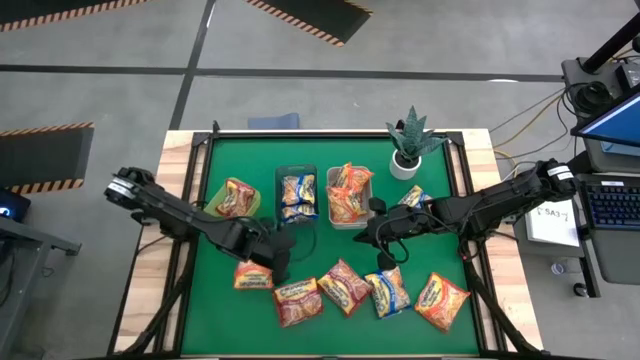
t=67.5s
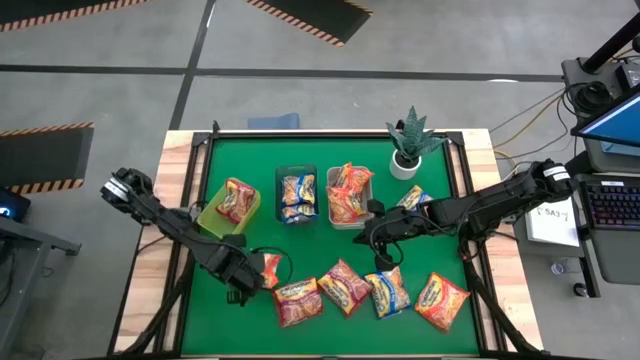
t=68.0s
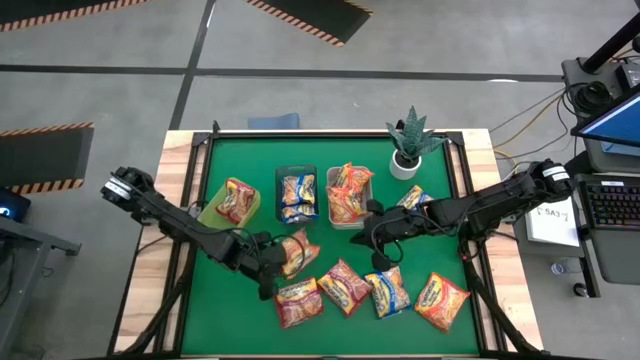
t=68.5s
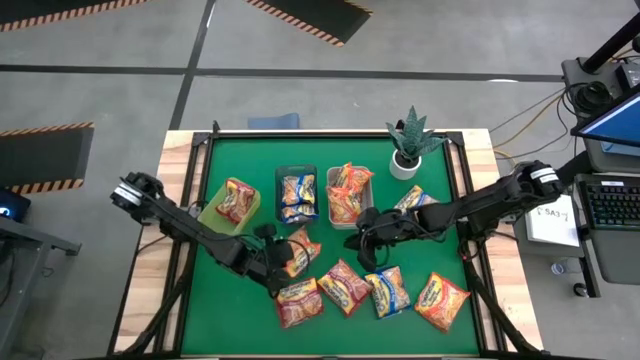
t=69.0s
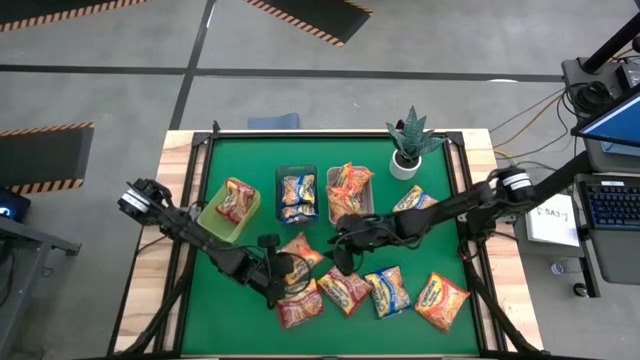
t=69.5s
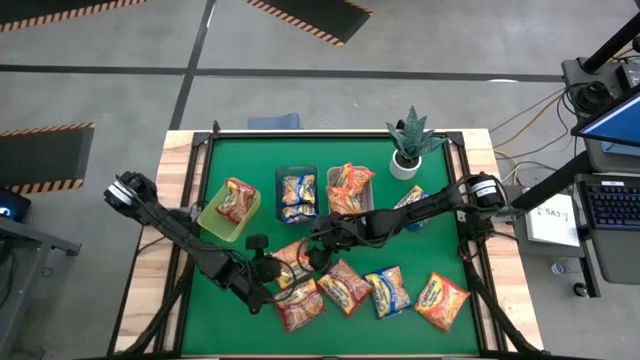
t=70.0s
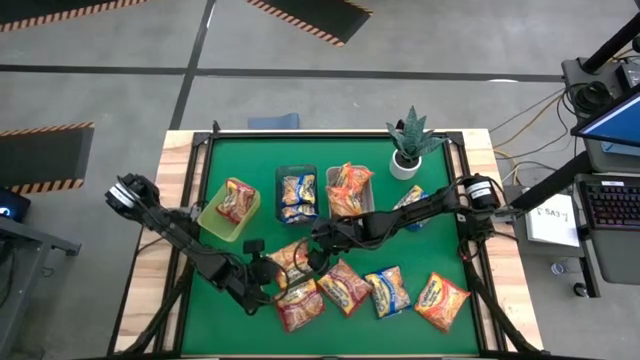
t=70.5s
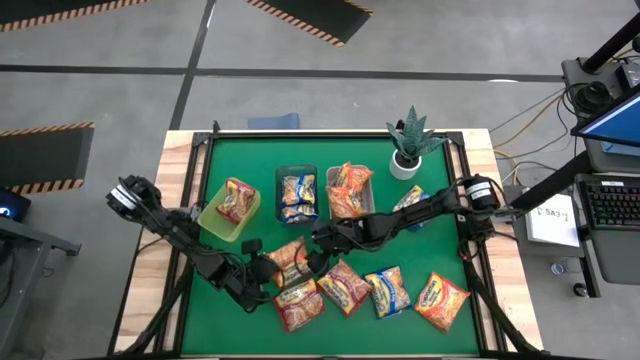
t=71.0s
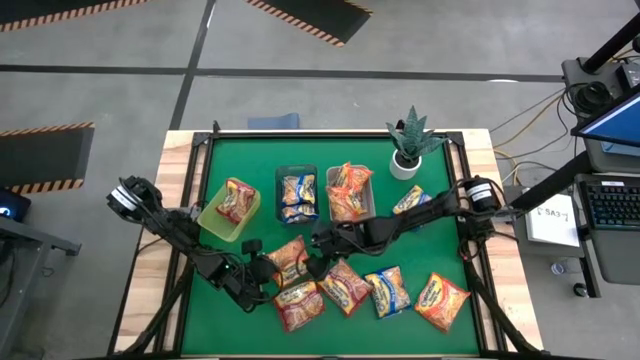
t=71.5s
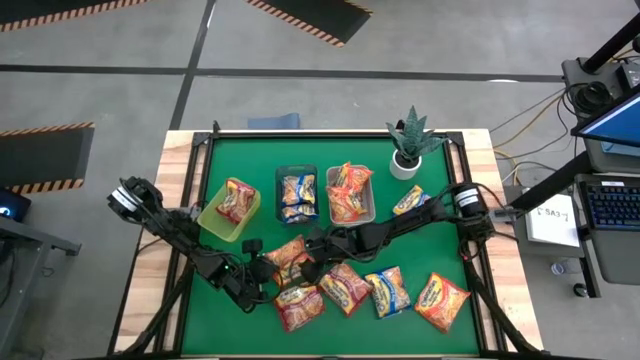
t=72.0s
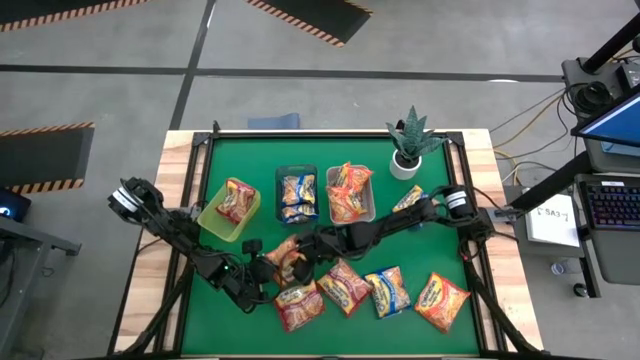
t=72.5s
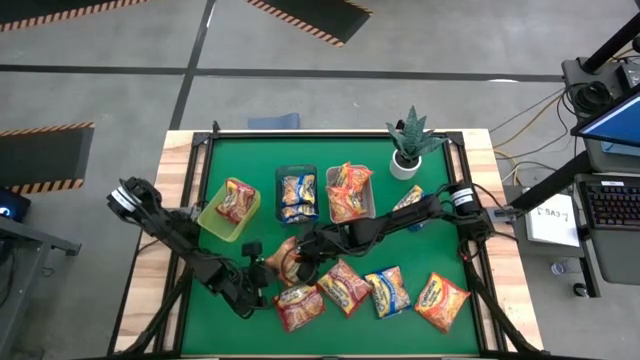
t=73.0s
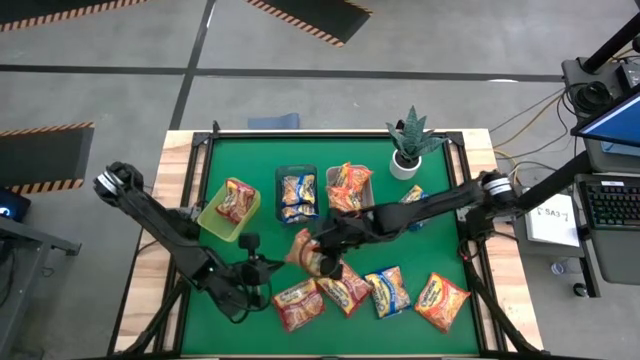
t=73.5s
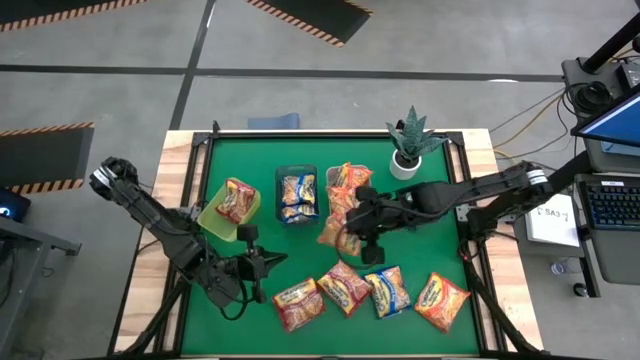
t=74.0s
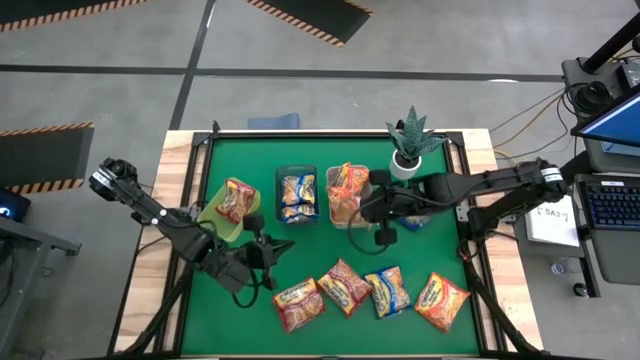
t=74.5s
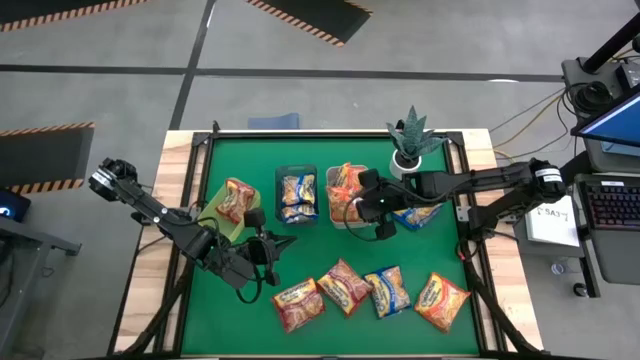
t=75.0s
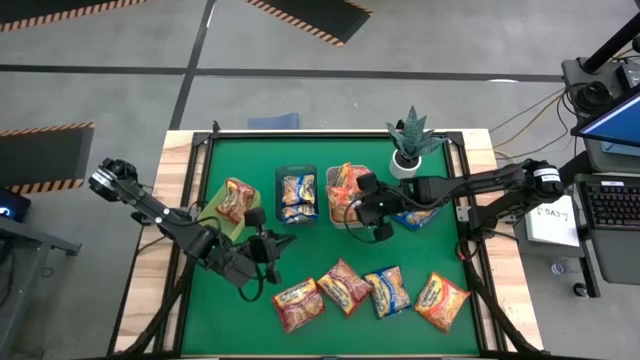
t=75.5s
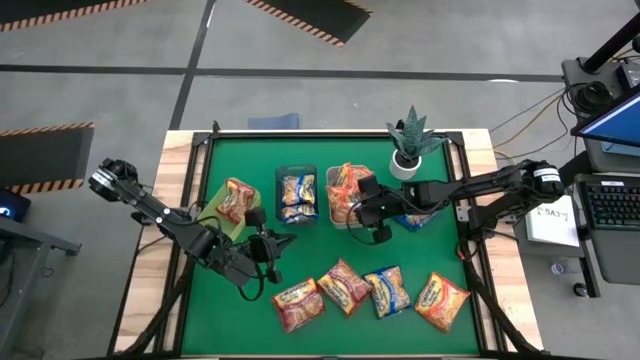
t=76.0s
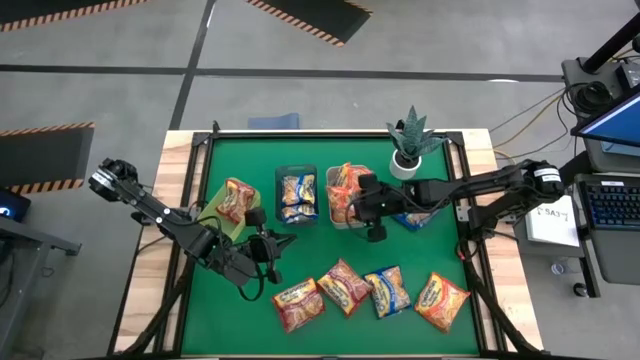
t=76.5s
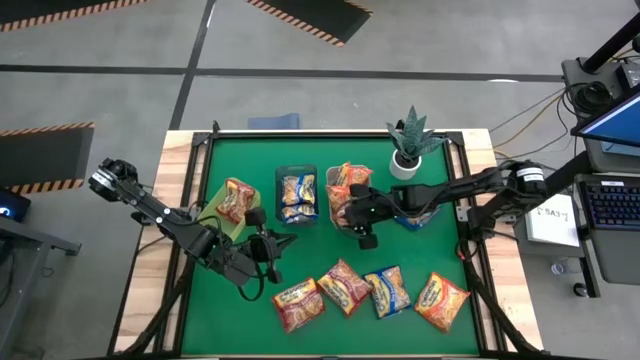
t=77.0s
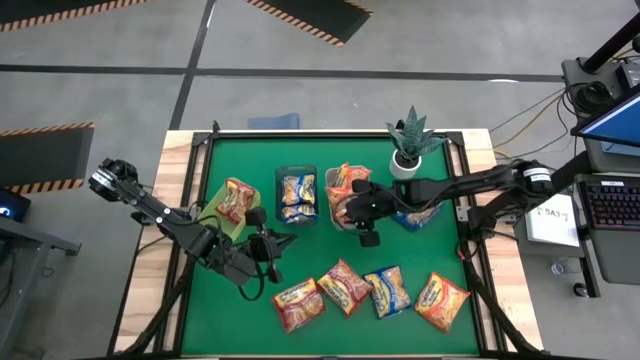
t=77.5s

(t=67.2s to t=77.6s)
Task: Sort Maruchan noodles
Put the orange noodle pack into the gray bin
